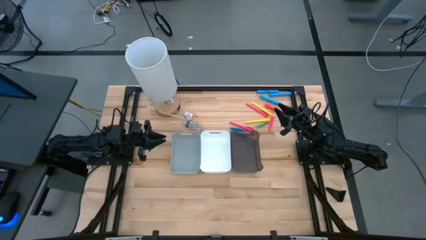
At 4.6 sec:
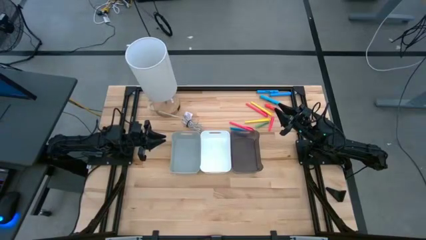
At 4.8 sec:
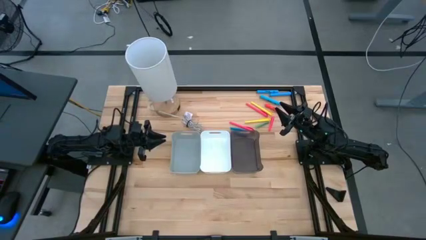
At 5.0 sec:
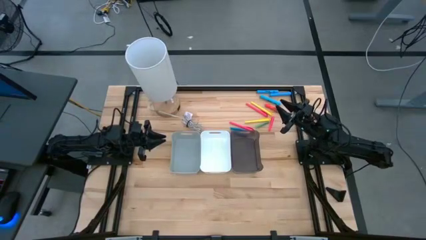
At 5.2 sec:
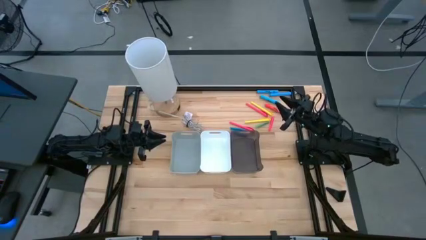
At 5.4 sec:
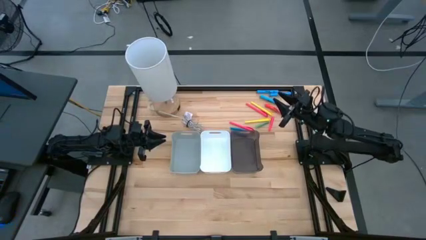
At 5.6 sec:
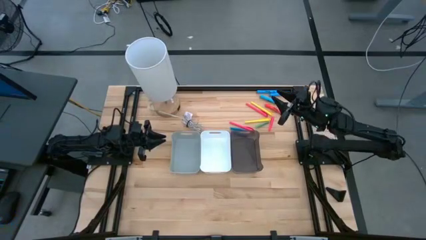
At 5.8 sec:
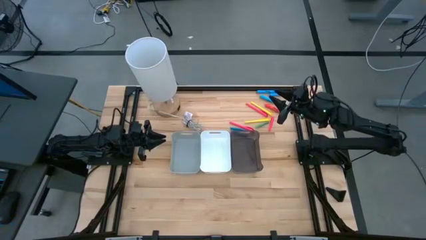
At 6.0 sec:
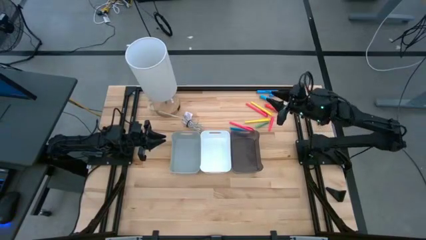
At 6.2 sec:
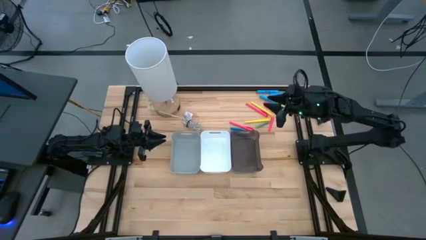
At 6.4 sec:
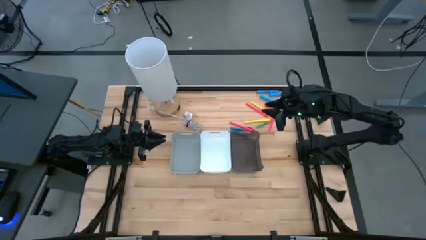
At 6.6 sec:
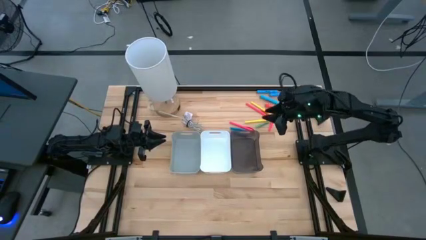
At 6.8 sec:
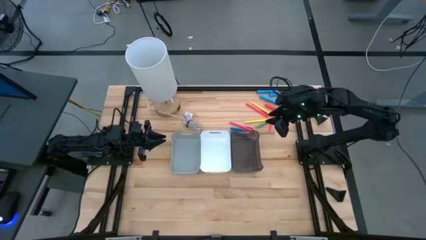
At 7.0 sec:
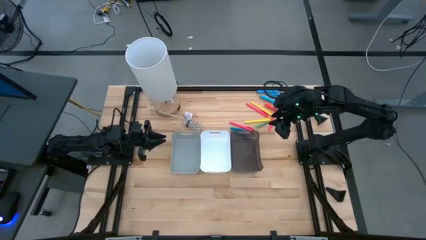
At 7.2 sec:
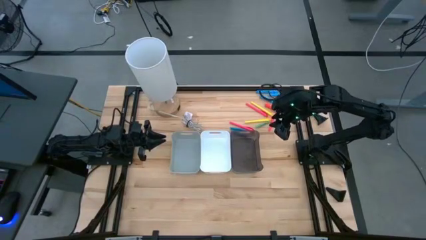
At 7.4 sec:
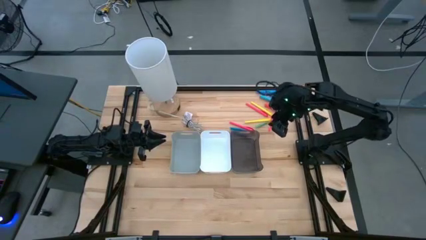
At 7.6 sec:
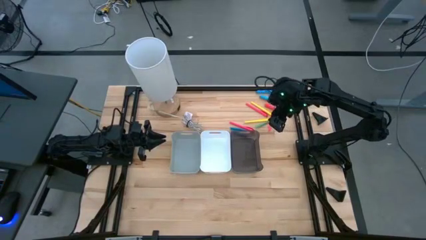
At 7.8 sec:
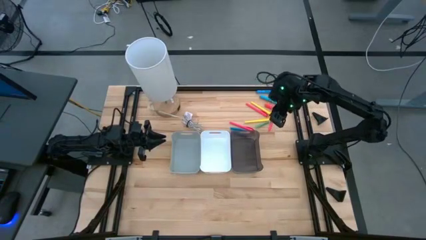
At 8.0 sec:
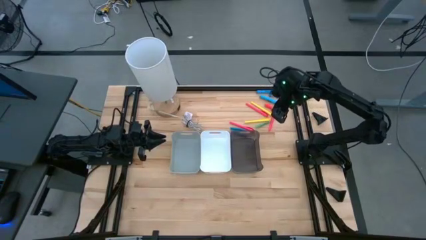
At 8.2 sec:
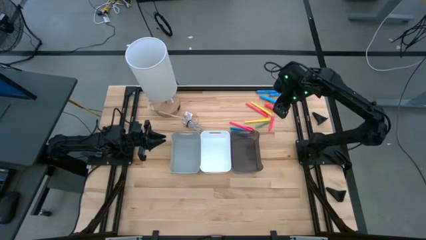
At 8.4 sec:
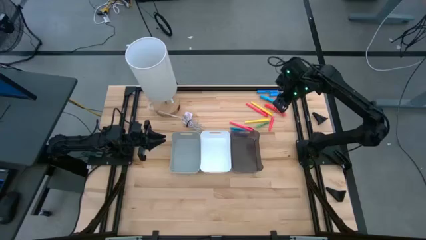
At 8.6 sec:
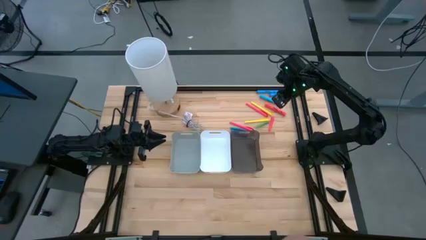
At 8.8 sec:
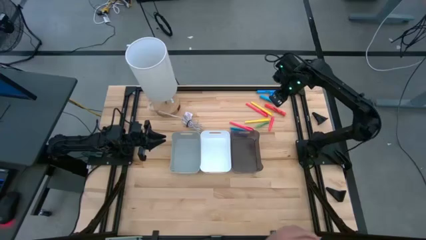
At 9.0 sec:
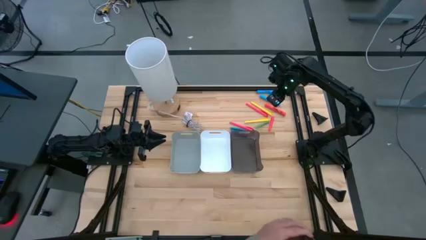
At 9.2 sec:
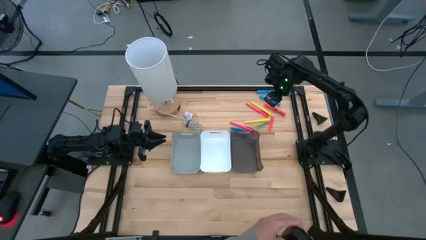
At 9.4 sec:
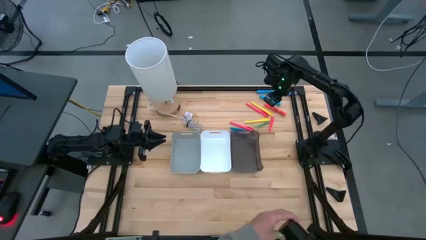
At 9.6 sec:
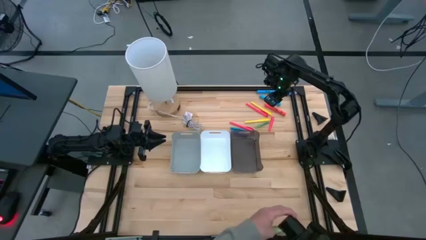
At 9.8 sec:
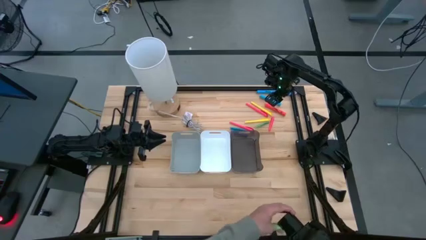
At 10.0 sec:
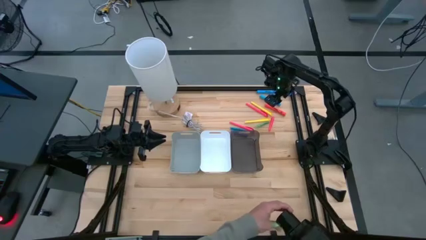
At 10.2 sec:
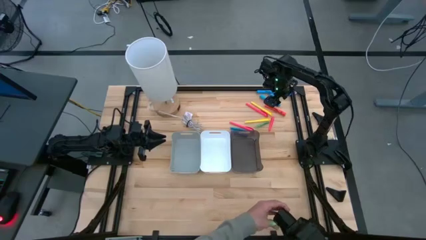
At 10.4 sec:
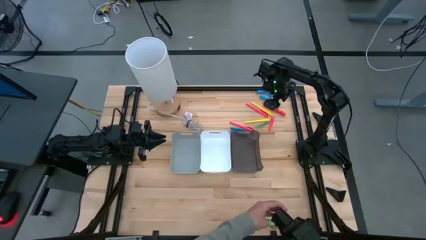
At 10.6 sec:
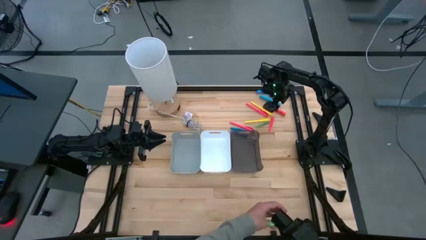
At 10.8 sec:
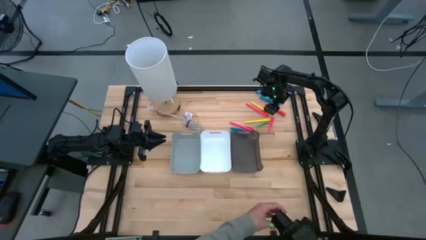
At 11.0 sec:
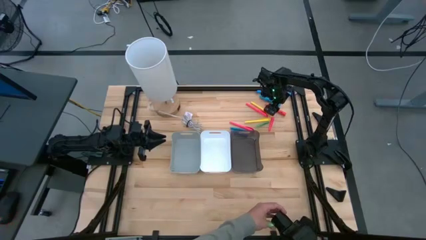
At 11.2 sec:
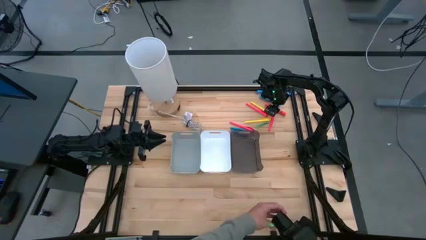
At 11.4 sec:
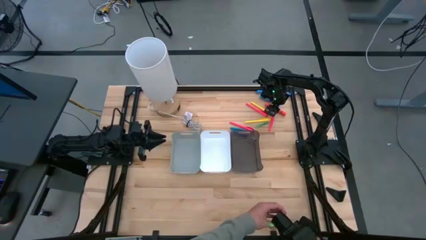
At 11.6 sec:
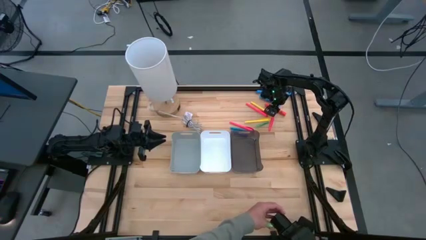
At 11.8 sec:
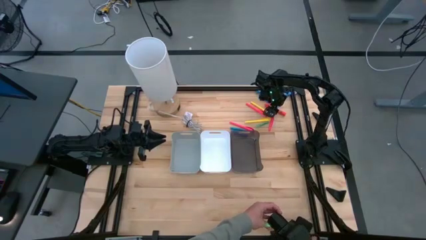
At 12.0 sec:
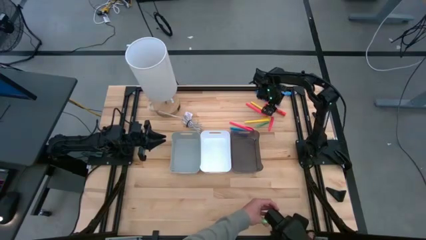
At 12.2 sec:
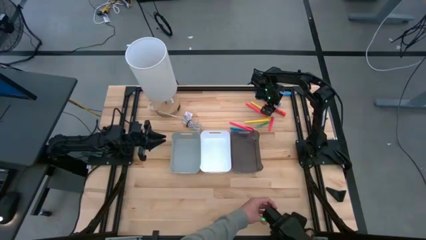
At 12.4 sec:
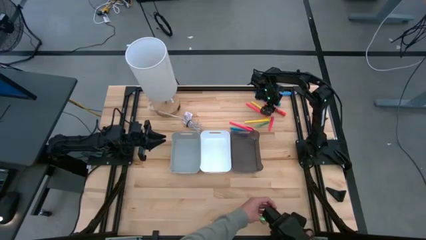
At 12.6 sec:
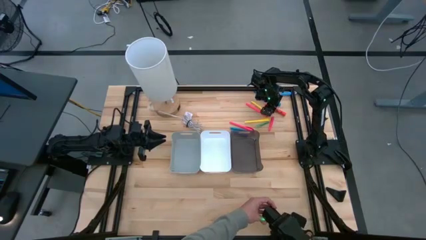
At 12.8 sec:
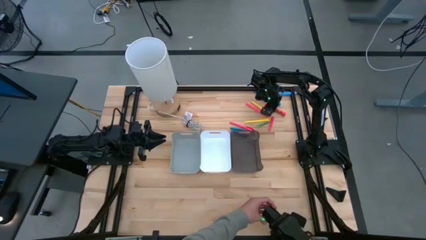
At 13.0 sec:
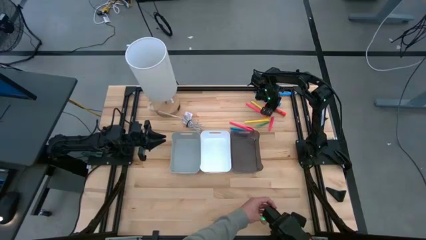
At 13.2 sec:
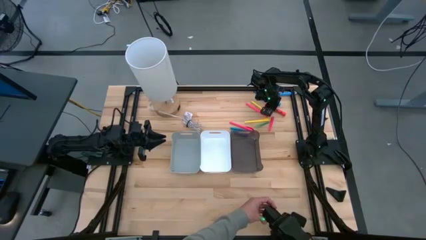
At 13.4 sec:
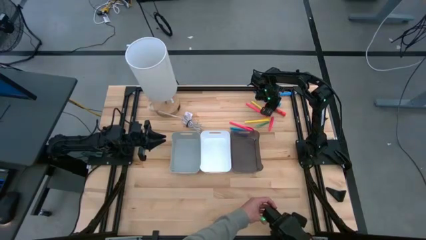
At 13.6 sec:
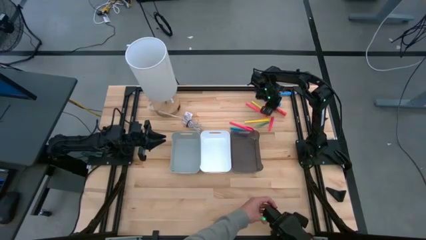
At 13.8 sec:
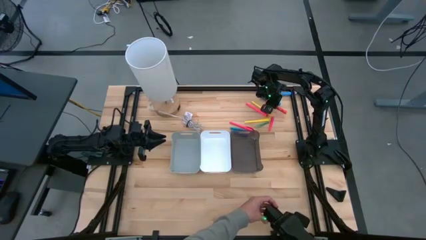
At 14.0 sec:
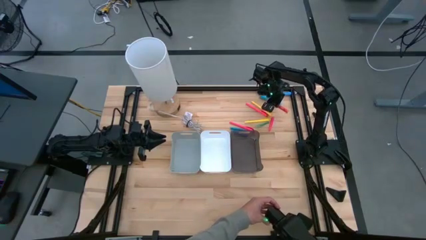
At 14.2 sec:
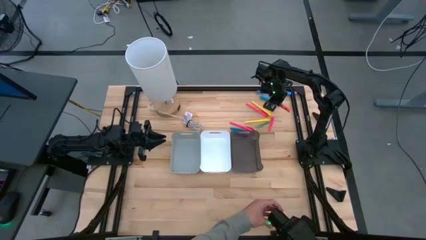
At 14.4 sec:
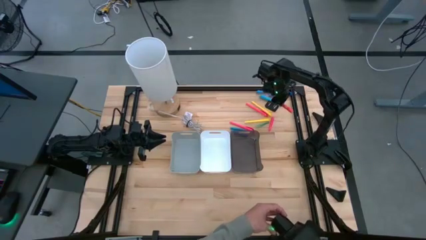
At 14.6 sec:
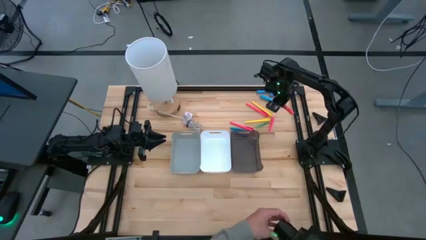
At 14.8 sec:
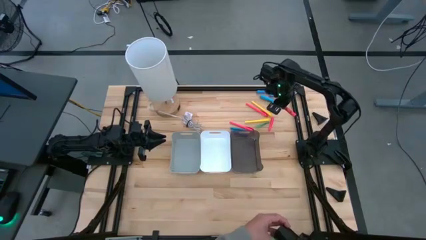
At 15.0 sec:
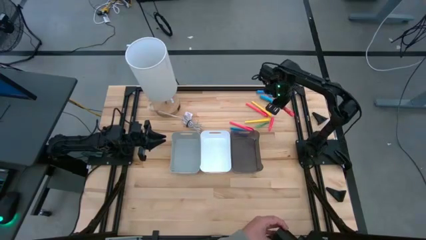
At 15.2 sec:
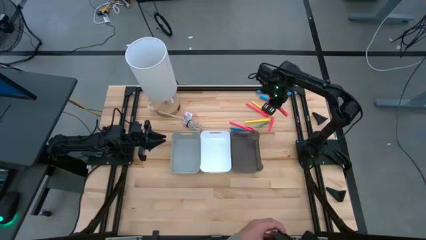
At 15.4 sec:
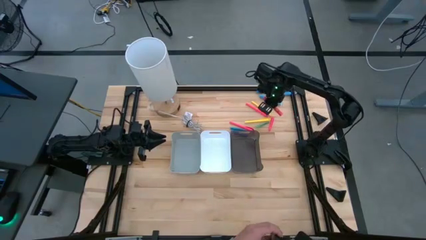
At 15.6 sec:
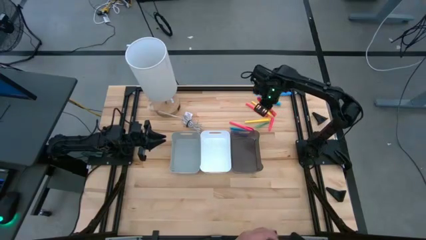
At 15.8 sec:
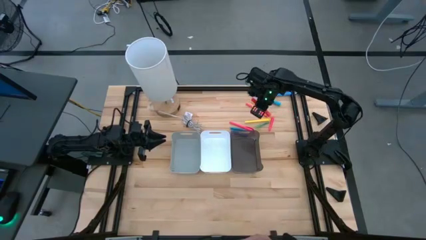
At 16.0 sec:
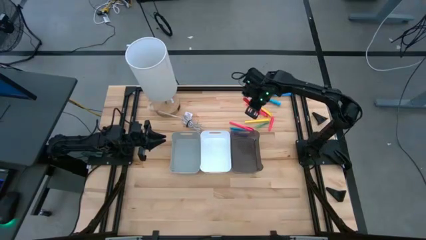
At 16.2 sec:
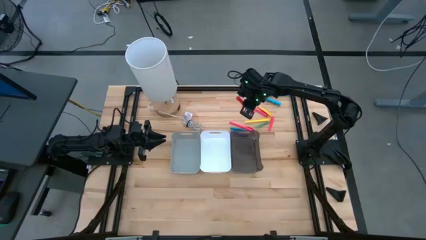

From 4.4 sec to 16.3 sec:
Task: Pick & Place Markers
Put the orange marker into the gray bin

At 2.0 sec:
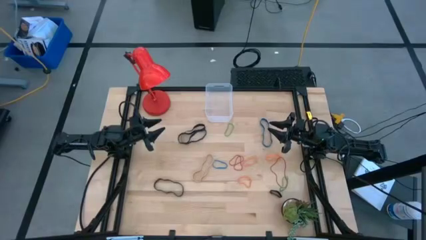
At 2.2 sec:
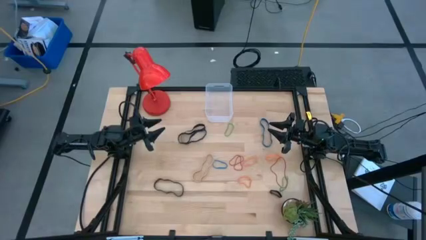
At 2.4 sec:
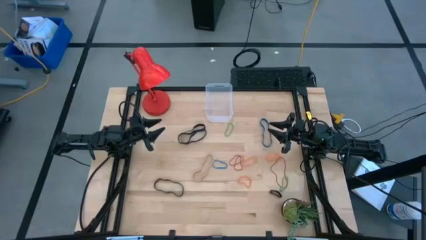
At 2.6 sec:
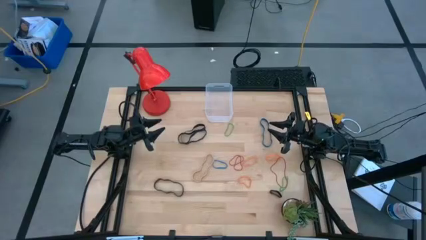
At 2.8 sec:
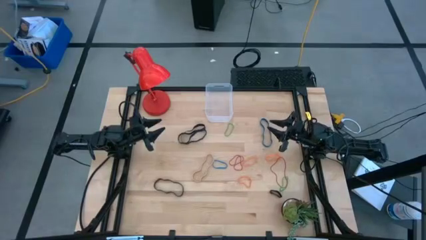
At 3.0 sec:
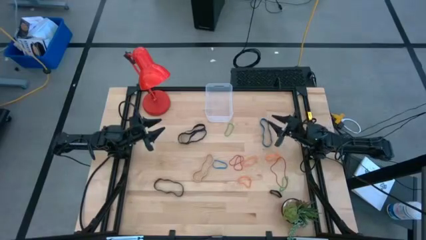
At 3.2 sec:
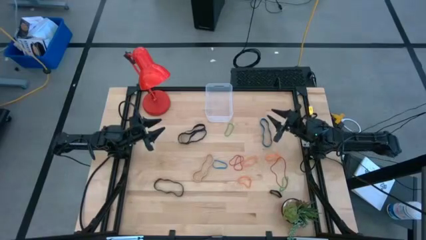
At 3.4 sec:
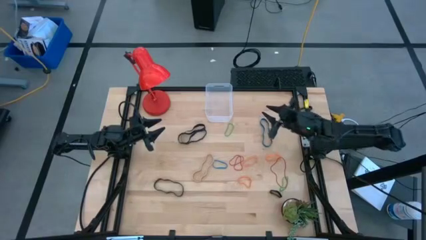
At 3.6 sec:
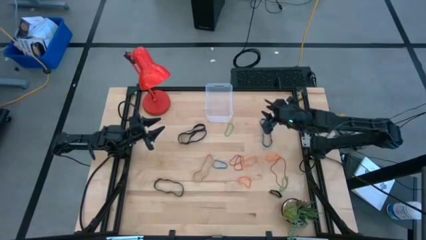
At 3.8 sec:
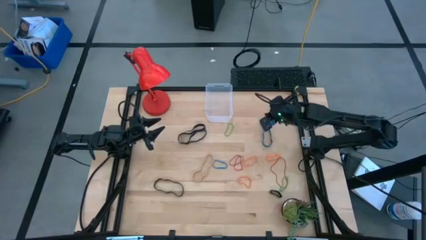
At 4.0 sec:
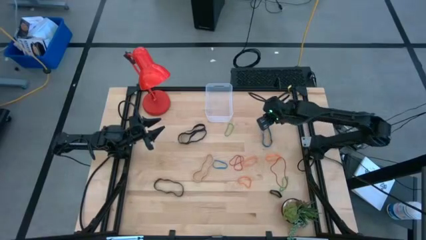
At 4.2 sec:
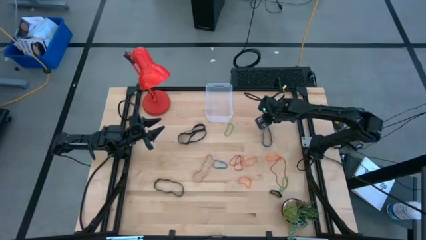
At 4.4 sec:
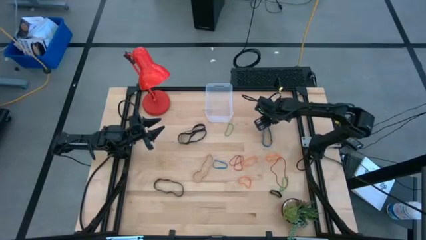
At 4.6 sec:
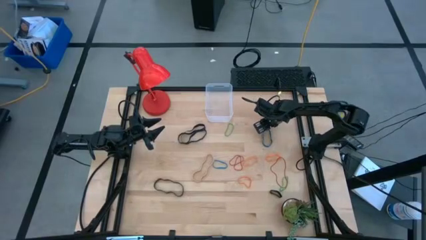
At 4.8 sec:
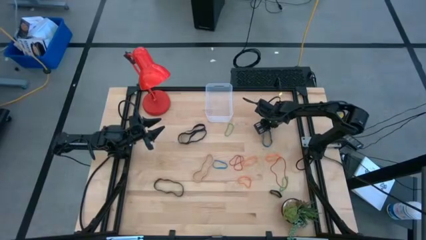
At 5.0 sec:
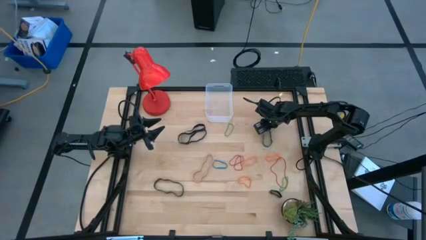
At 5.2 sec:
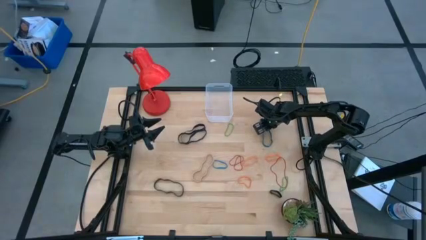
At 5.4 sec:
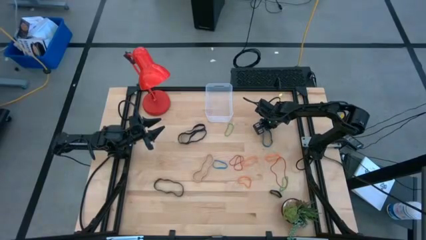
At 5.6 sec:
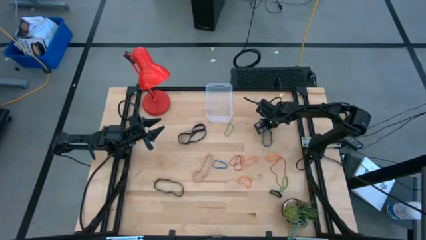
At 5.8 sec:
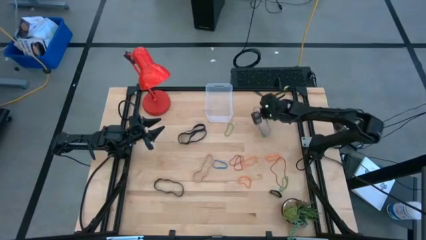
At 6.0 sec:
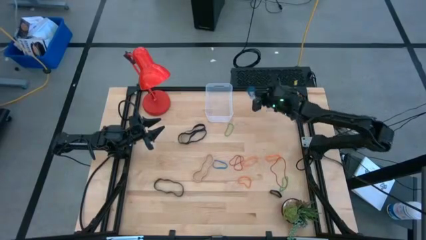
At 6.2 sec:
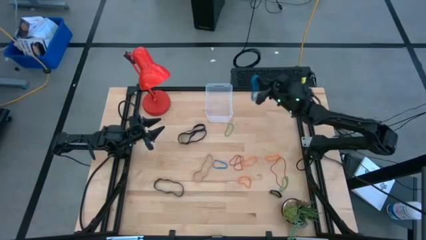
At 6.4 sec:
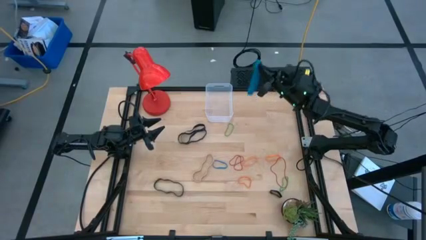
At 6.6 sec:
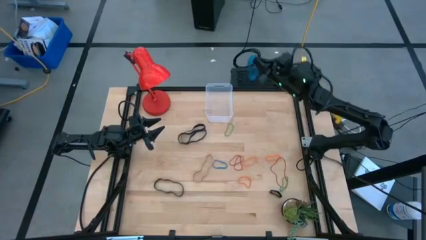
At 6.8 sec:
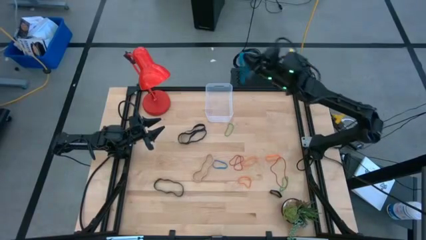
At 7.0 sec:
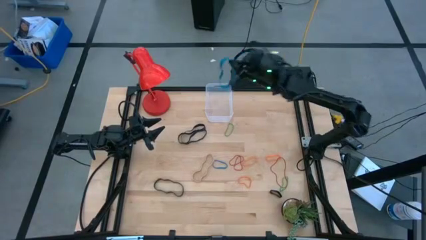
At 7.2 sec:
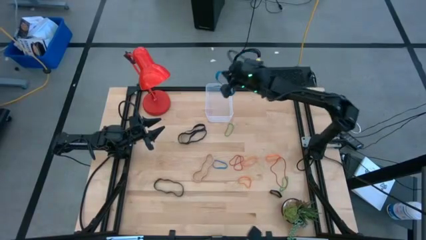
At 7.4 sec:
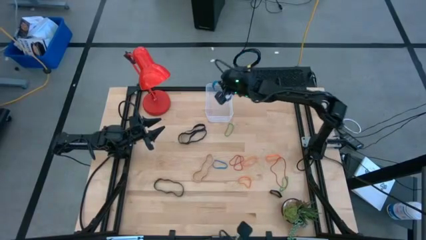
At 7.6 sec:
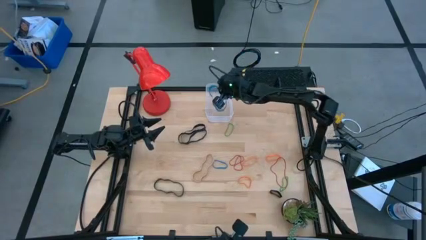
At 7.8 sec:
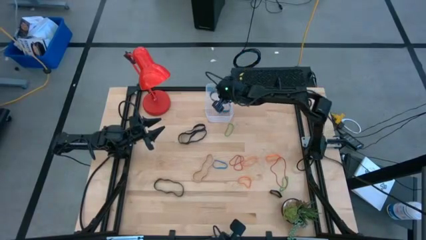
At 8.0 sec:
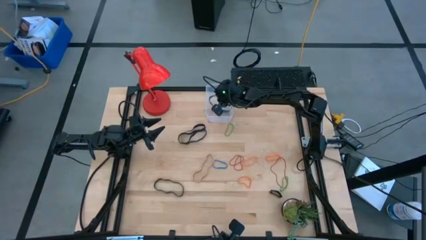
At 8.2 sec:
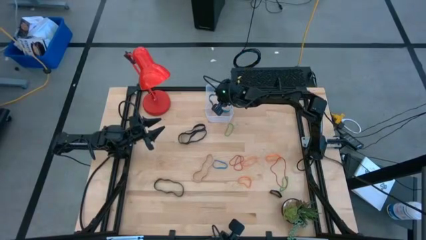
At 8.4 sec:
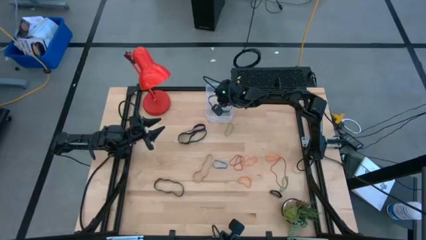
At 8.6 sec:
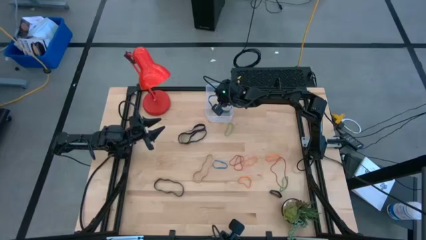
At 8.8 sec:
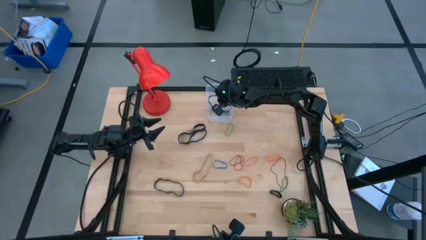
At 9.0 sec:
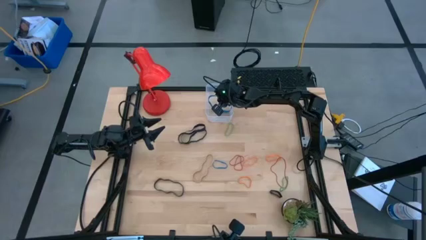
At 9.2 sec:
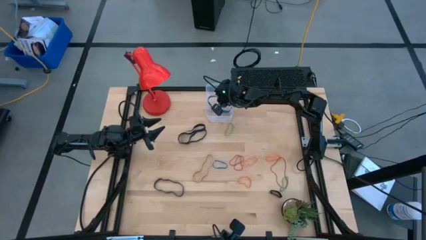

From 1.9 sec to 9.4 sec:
Task: Pick and place rubber bands into bin
Put the blue rubber band into the transparent bin
